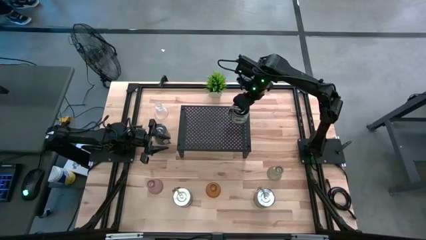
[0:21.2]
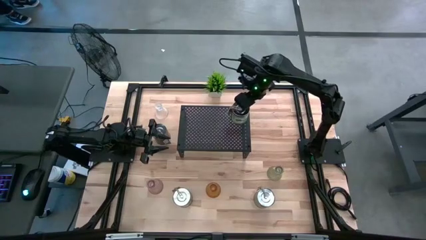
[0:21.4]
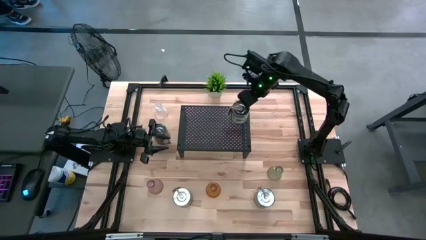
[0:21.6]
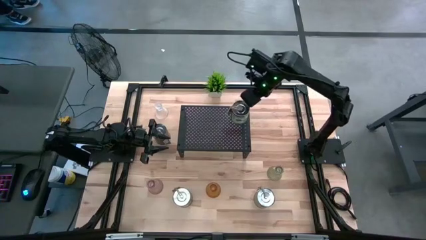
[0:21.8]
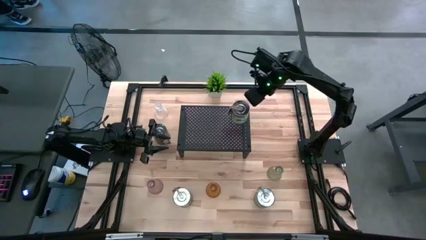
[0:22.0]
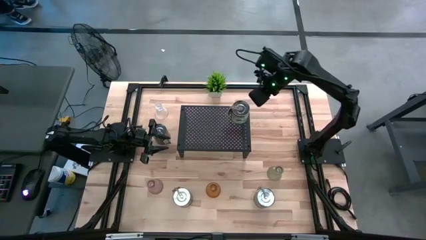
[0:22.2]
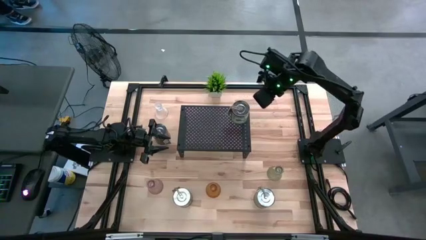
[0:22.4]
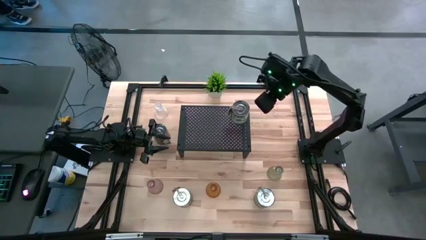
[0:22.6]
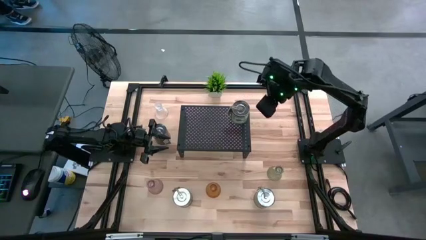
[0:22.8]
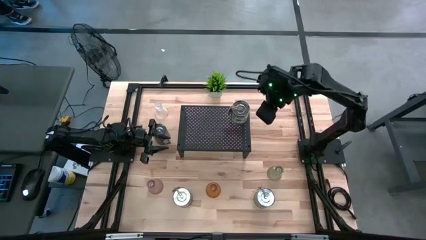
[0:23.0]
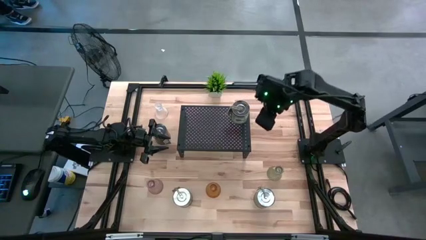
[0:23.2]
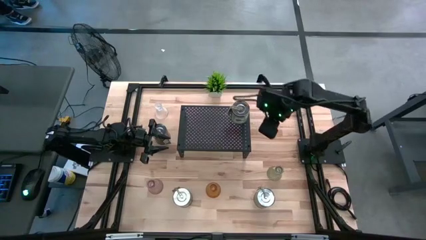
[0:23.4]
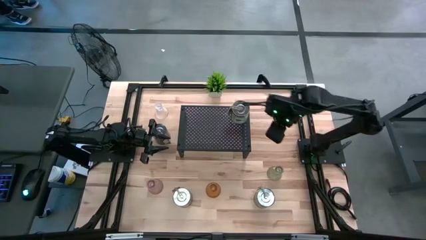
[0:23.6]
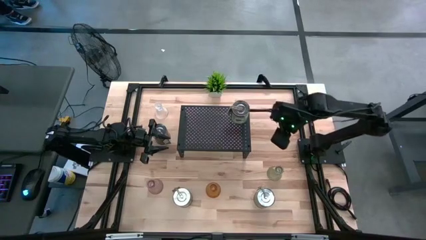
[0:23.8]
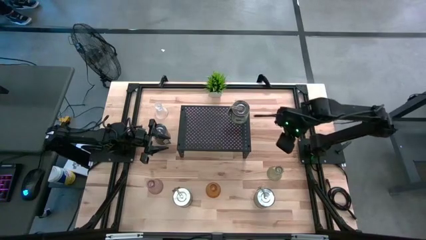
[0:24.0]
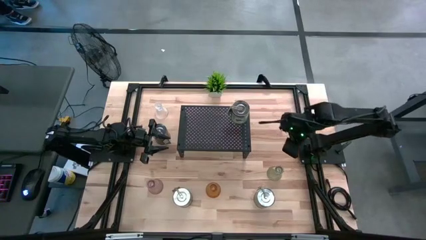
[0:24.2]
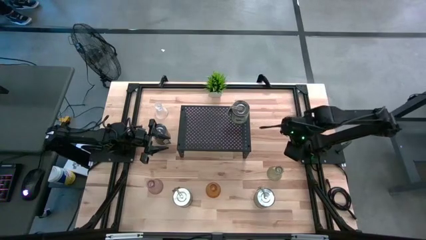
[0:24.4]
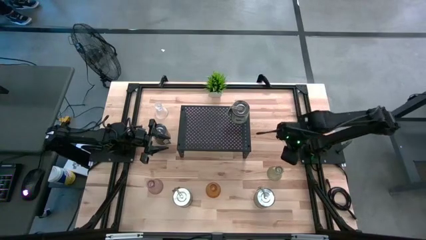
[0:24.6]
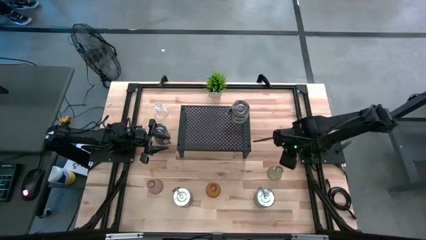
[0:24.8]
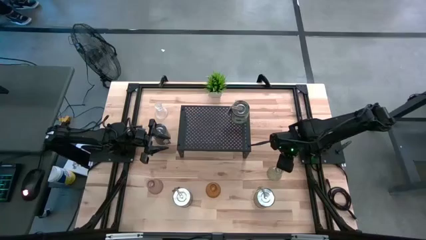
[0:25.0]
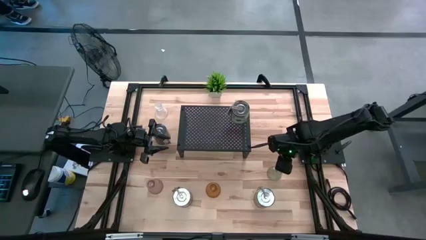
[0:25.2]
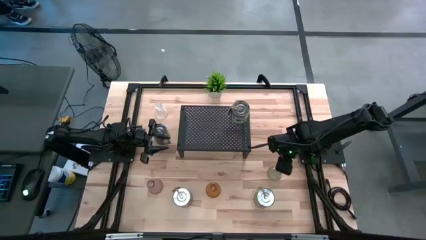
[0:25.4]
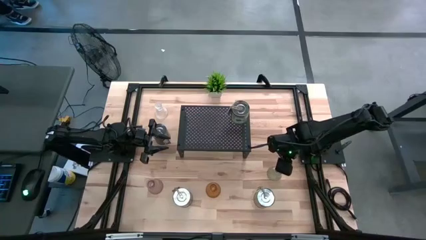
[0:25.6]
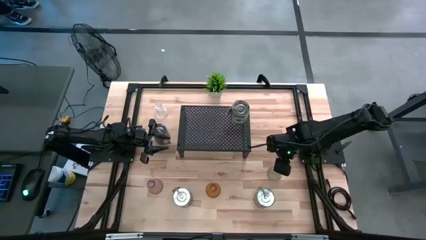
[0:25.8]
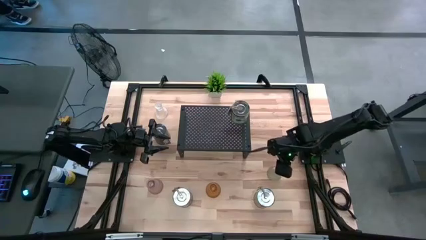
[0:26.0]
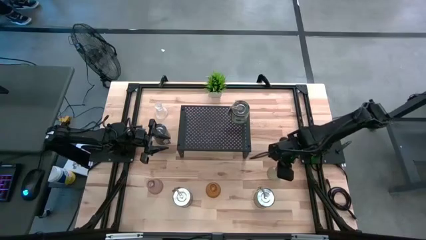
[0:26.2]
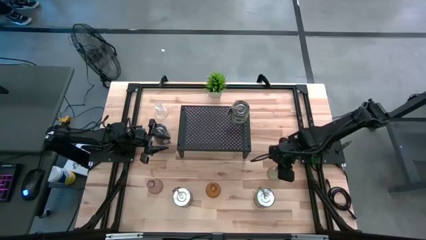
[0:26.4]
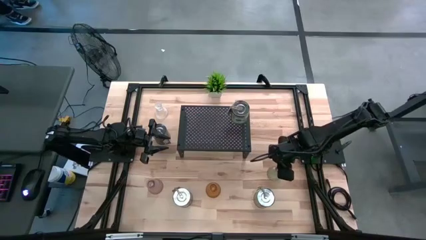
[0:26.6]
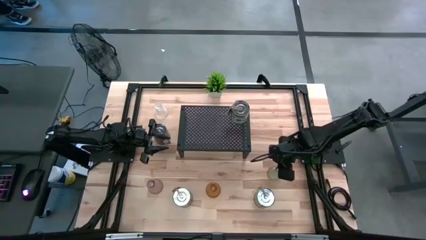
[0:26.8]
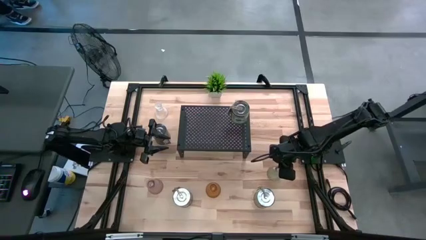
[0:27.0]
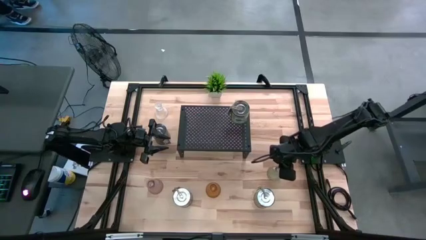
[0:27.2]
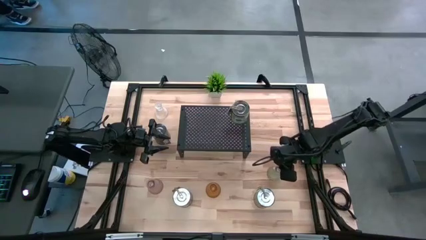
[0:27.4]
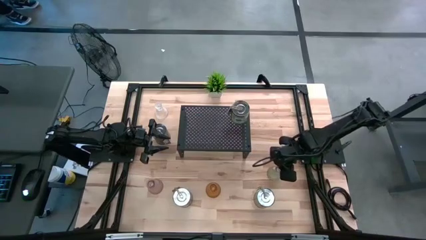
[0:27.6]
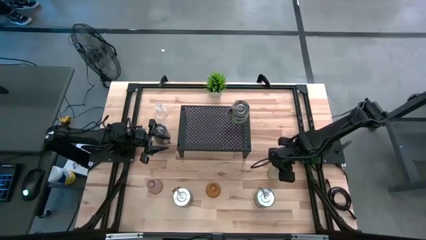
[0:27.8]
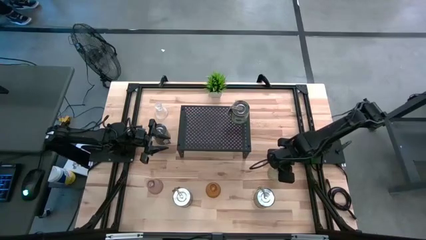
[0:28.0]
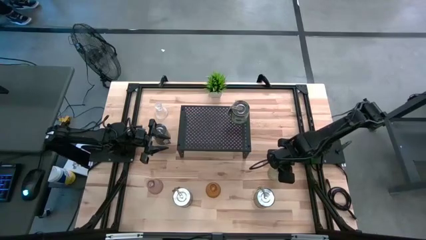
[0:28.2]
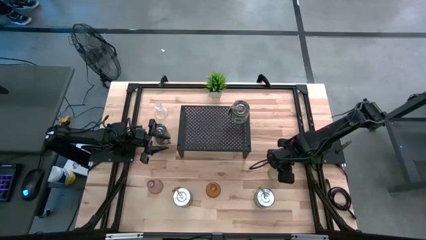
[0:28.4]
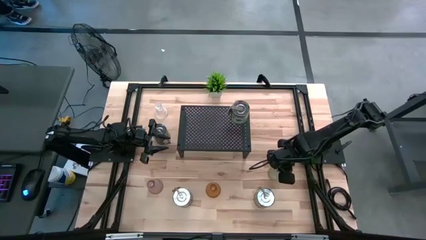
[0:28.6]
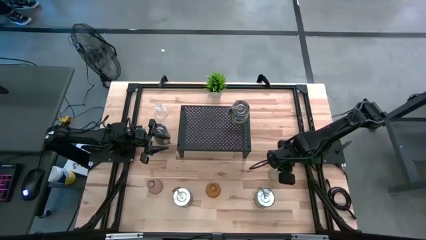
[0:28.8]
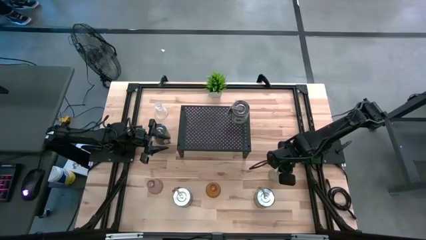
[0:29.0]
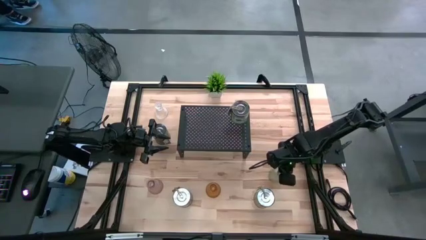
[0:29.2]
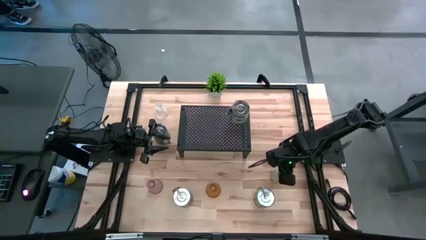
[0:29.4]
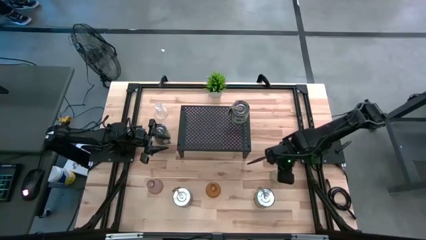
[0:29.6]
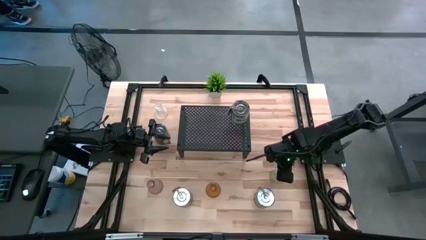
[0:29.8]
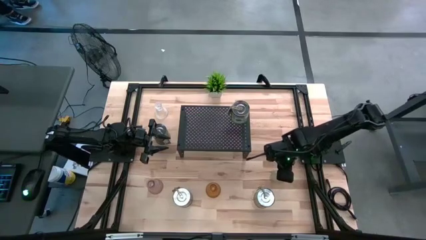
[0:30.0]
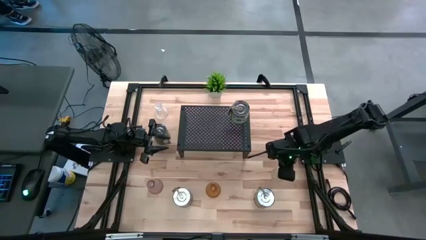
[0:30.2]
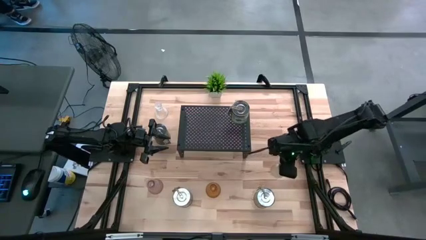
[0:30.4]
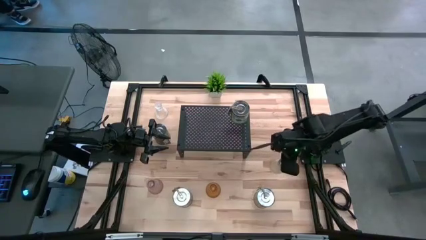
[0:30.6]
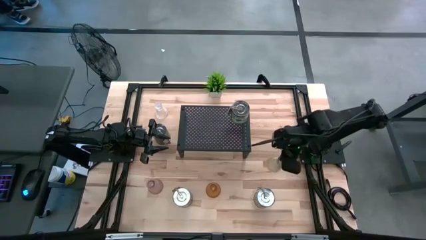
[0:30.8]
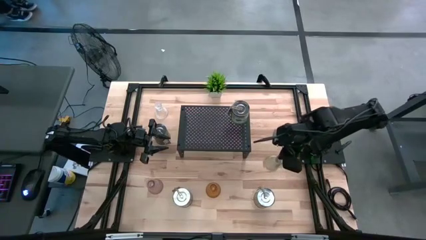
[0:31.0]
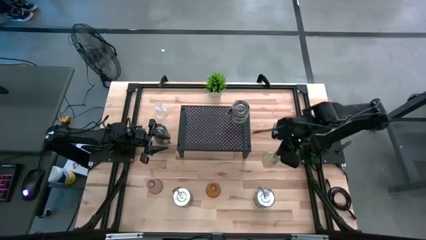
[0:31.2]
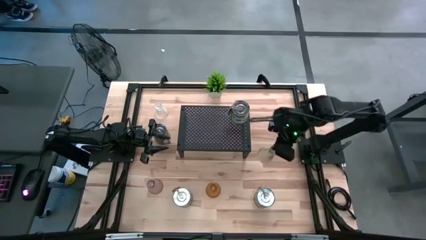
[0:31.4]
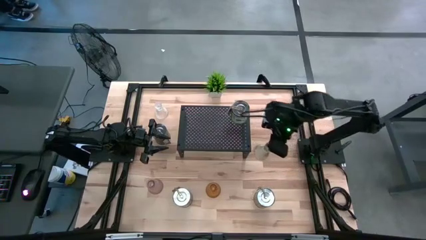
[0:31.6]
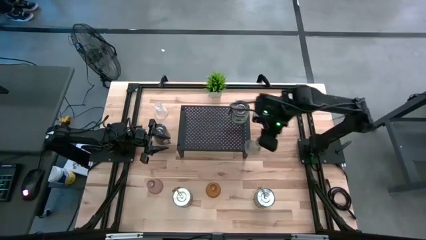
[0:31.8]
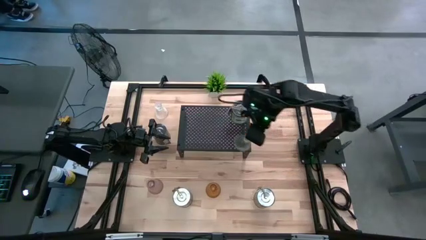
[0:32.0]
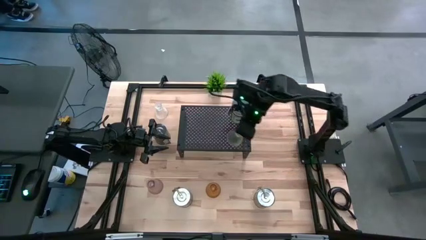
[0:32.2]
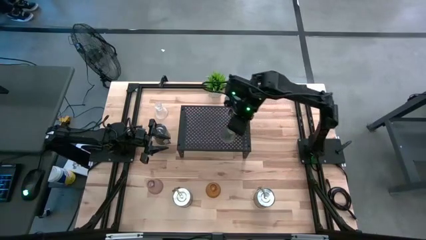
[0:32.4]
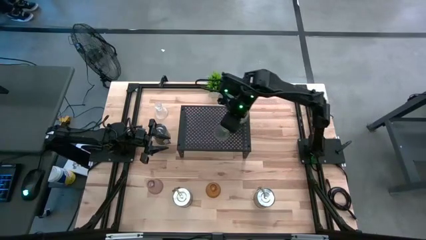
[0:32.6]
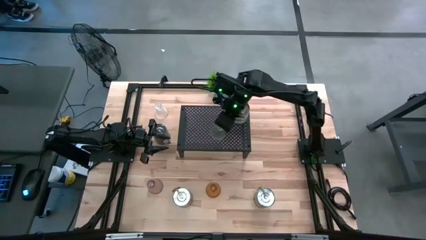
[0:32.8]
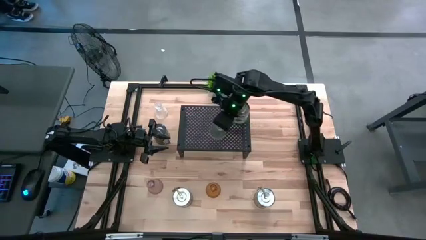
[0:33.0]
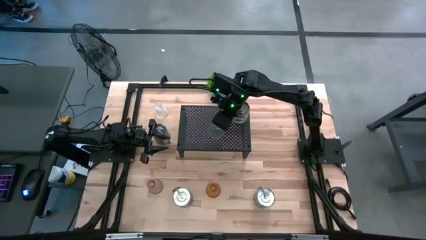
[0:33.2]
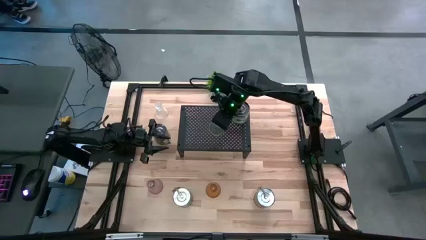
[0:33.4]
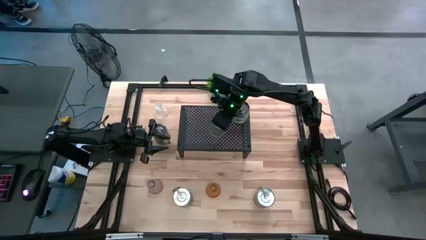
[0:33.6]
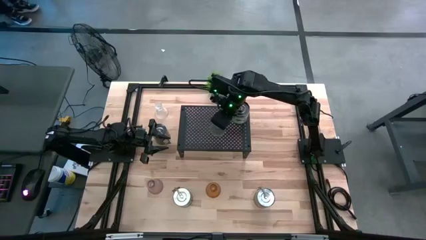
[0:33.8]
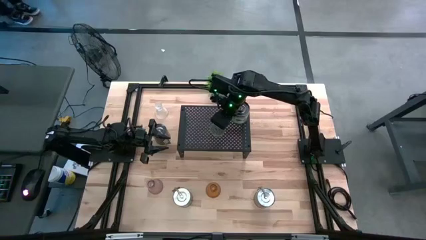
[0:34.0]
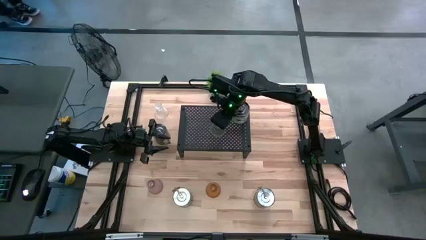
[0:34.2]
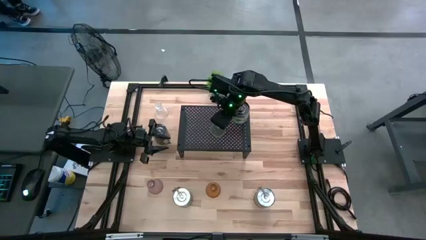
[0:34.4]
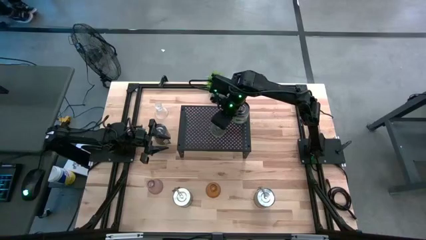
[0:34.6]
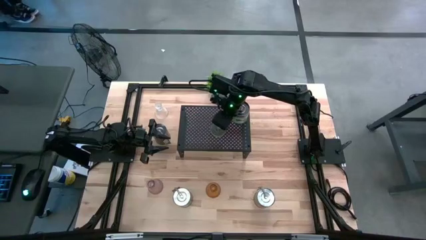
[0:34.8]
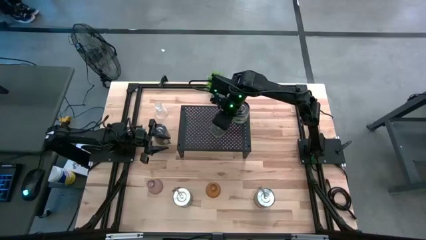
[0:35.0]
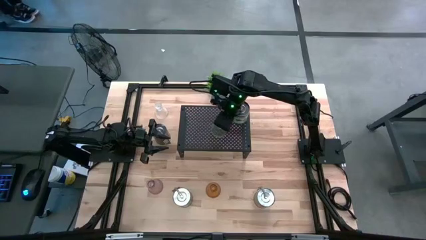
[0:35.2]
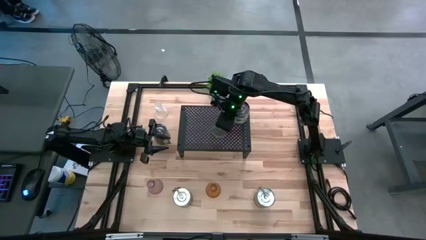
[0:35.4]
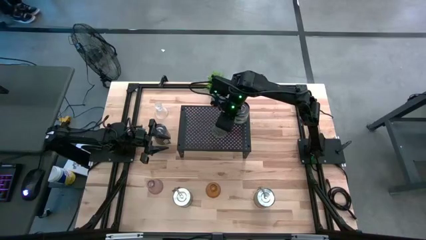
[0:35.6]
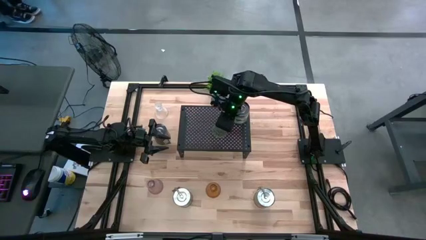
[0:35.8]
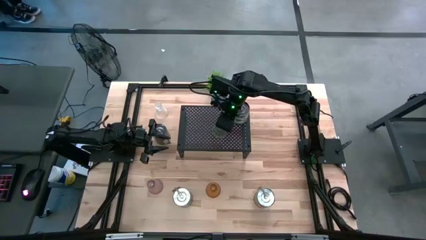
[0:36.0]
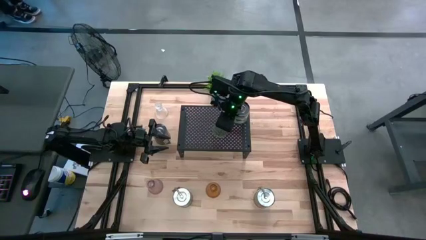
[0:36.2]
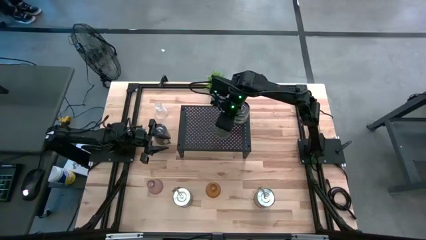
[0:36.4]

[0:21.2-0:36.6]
Task: Pick & Place candle stick holders
Put the green glass candle holder on the shelf
